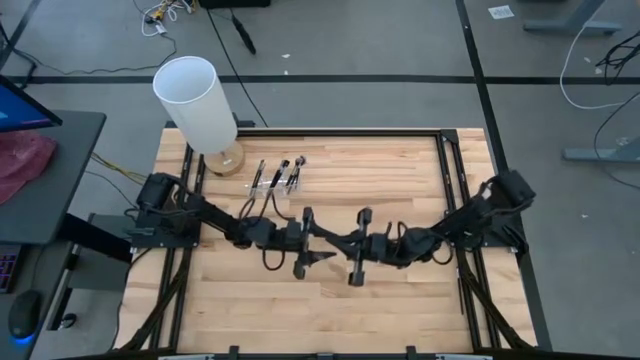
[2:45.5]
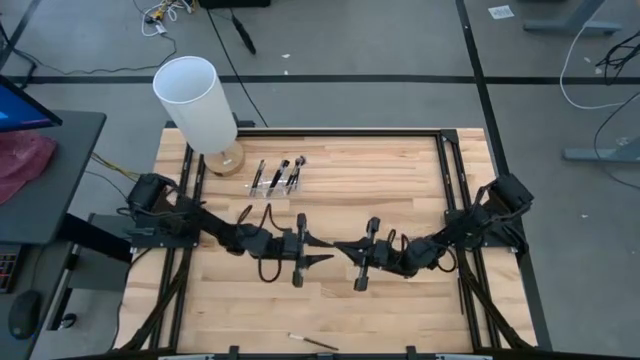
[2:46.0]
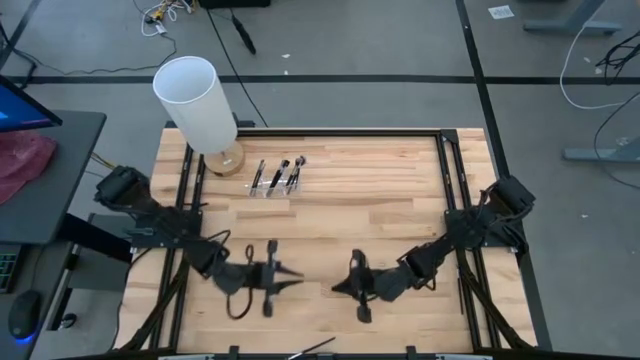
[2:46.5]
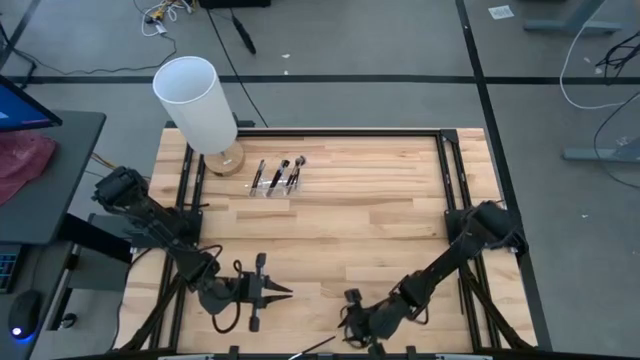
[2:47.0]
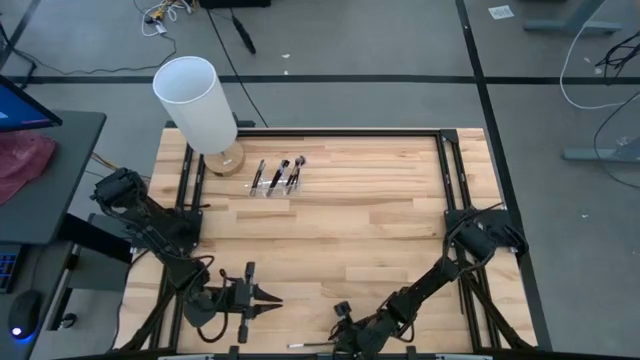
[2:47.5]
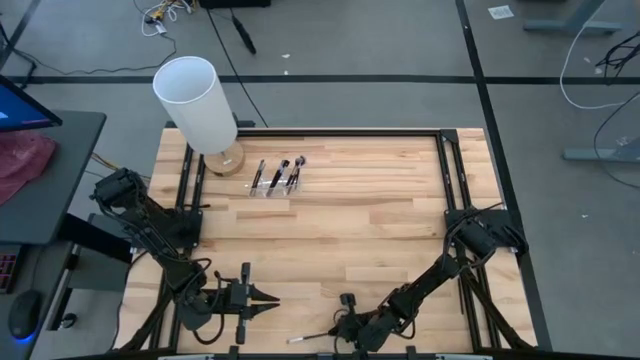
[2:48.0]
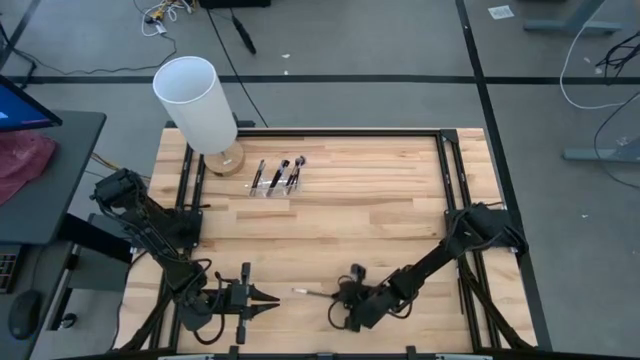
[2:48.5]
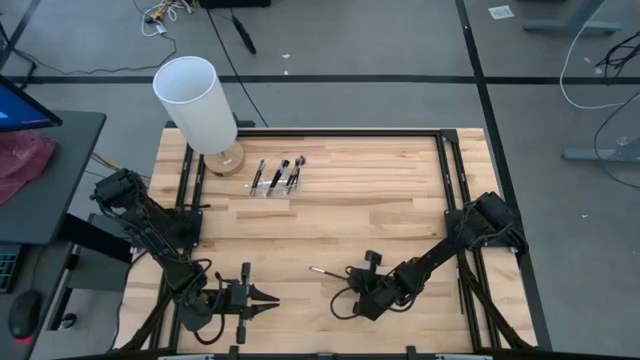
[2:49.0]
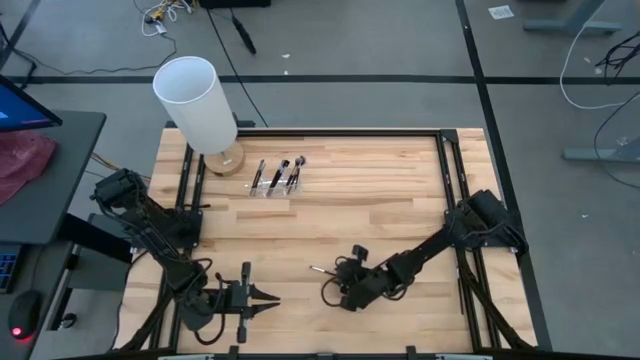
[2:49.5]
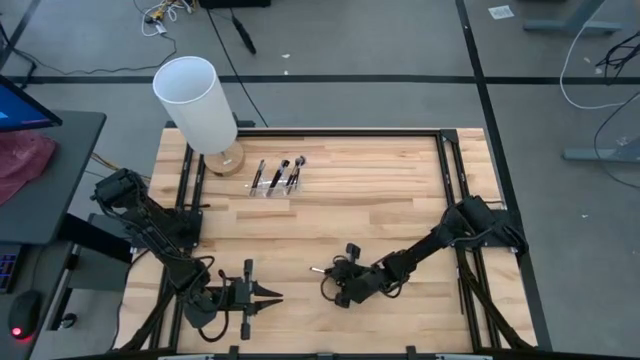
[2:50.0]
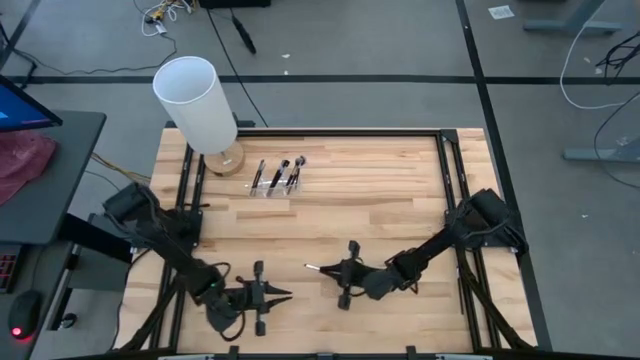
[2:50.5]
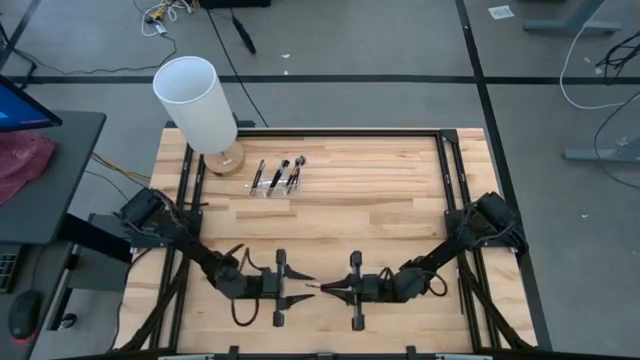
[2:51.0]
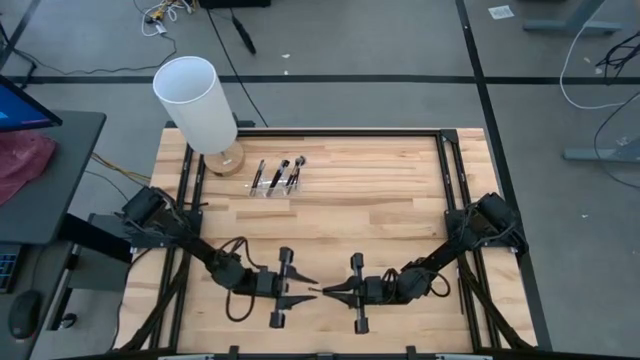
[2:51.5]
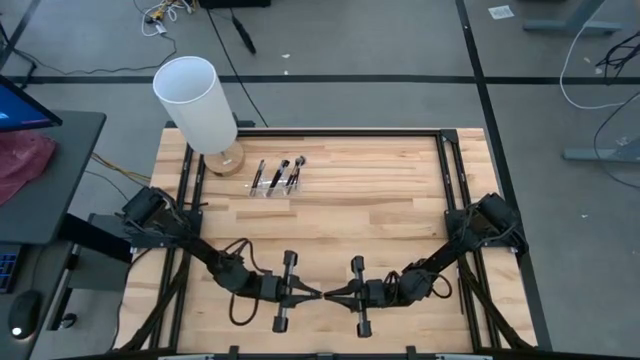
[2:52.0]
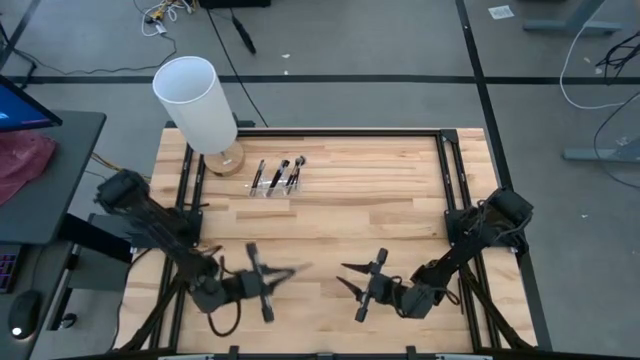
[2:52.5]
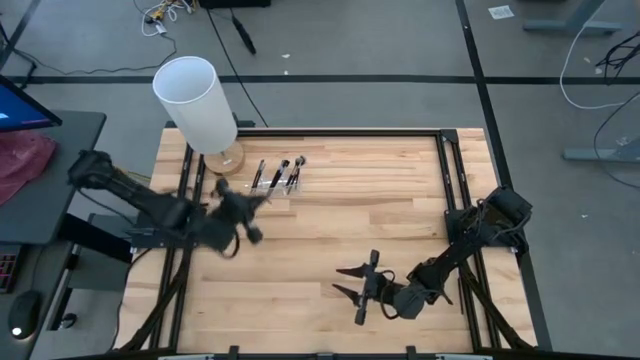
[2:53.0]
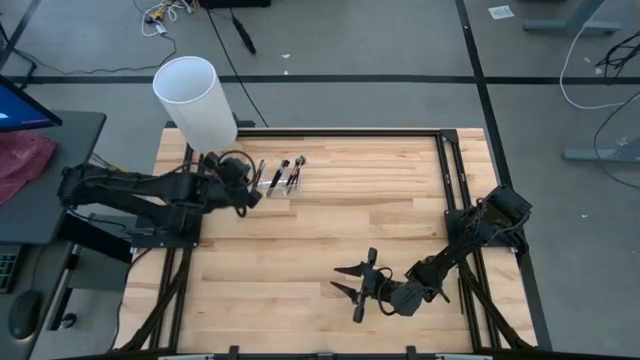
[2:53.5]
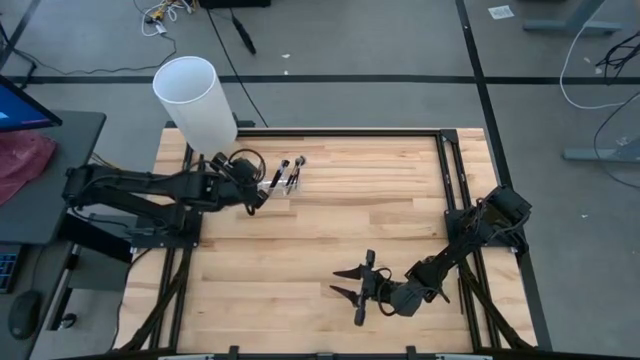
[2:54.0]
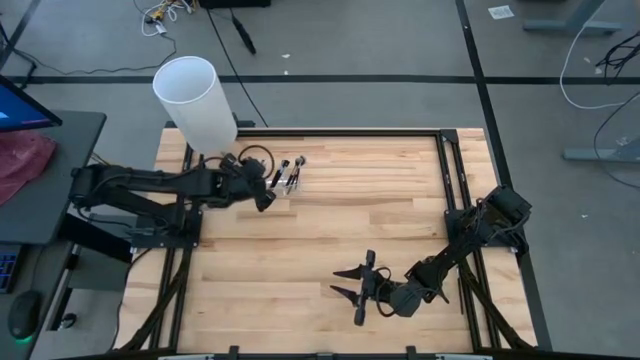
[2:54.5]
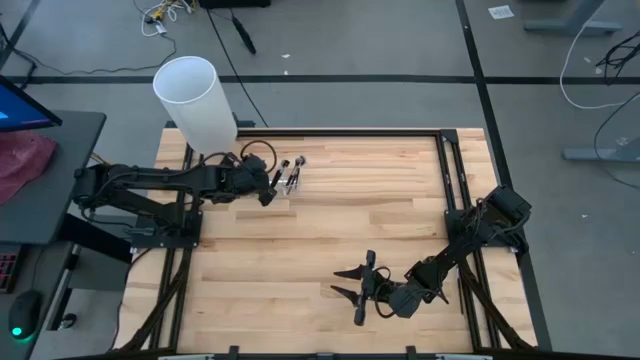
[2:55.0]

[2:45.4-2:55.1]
Task: Put items in baskets/containers
Put the eyeshadow brush into the transparent organizer

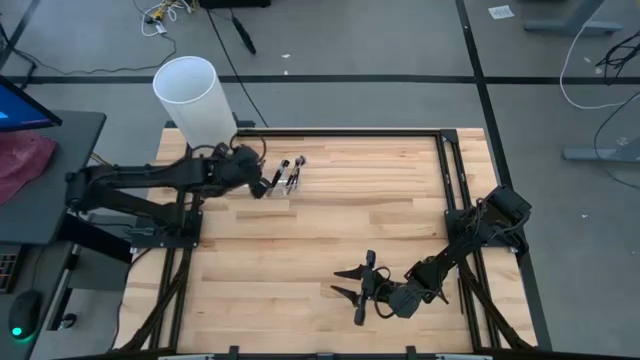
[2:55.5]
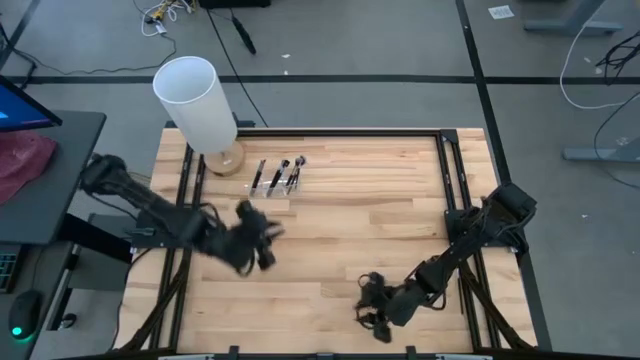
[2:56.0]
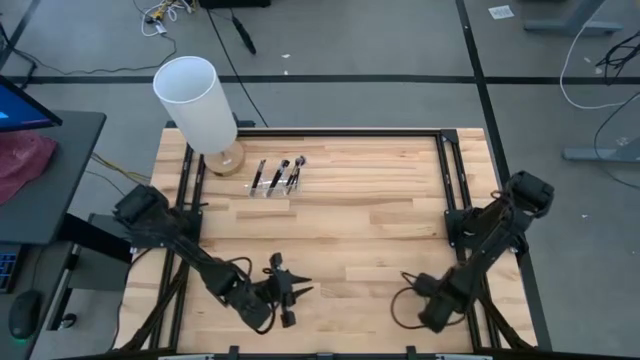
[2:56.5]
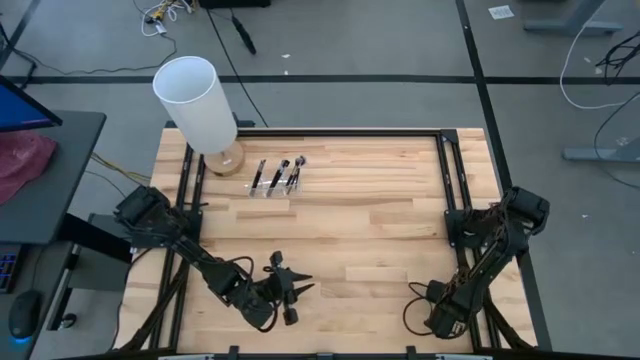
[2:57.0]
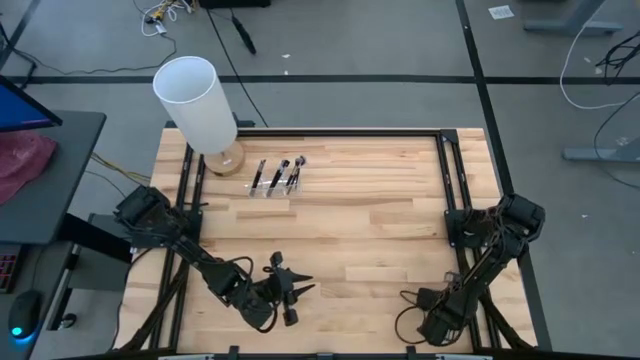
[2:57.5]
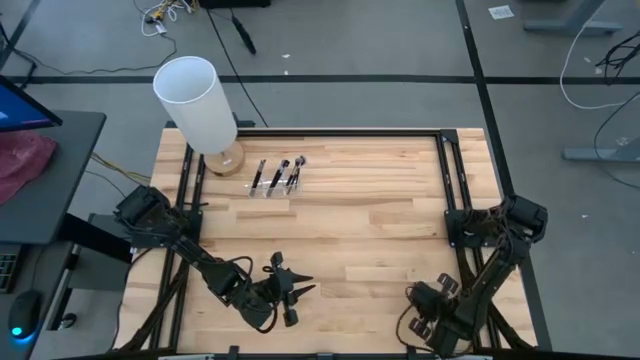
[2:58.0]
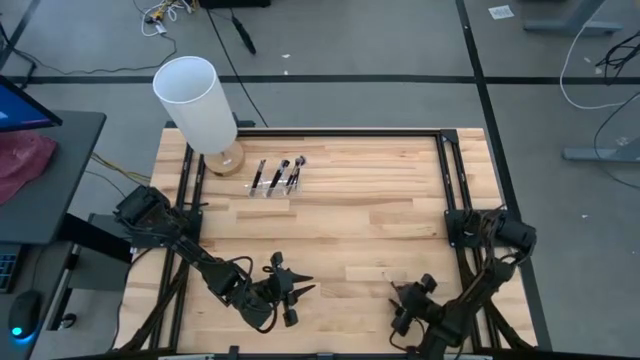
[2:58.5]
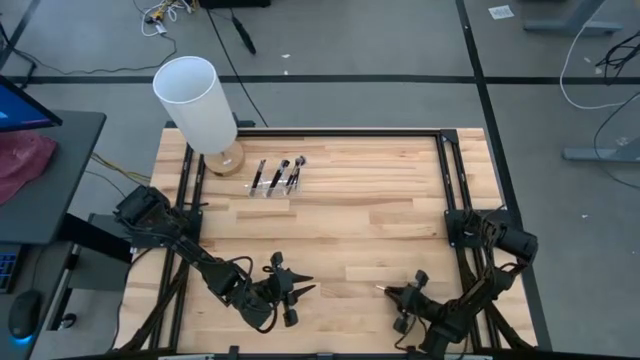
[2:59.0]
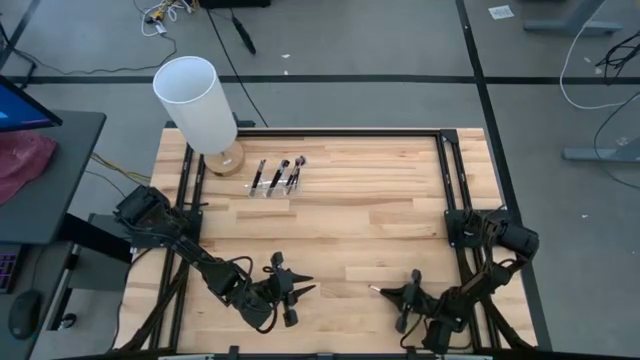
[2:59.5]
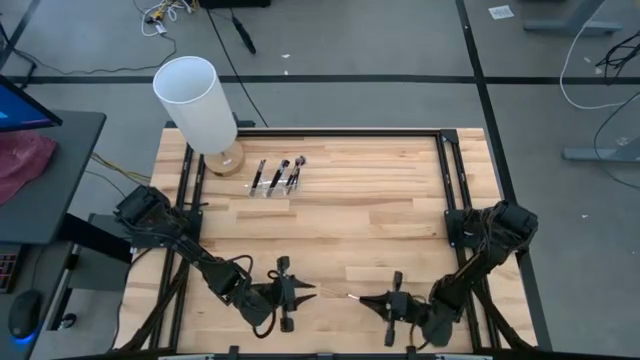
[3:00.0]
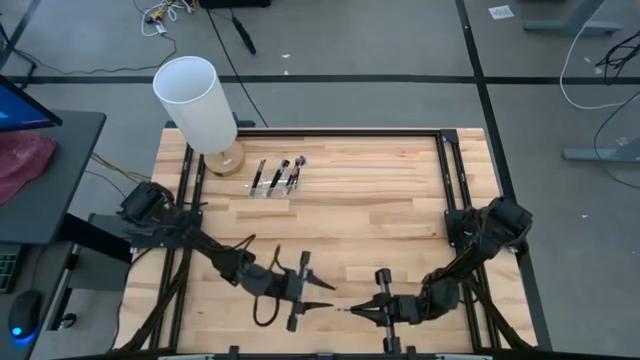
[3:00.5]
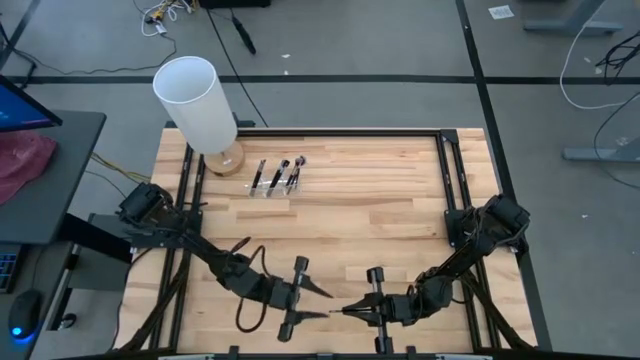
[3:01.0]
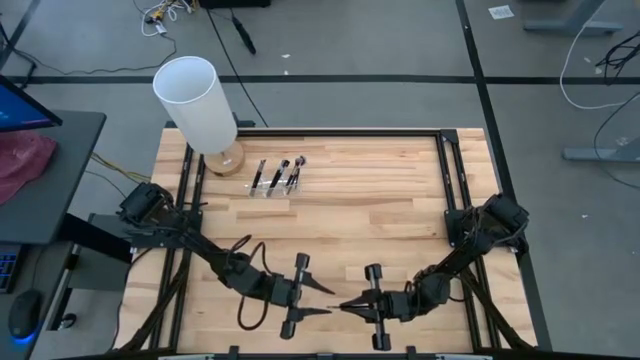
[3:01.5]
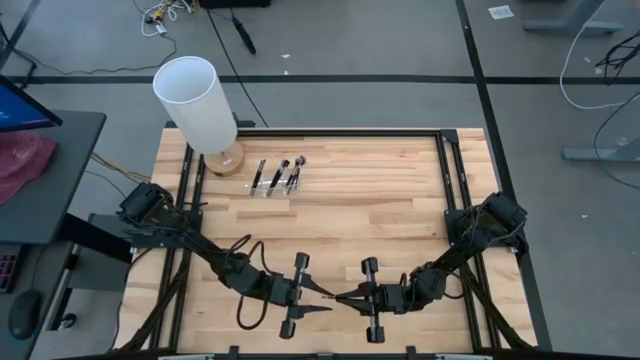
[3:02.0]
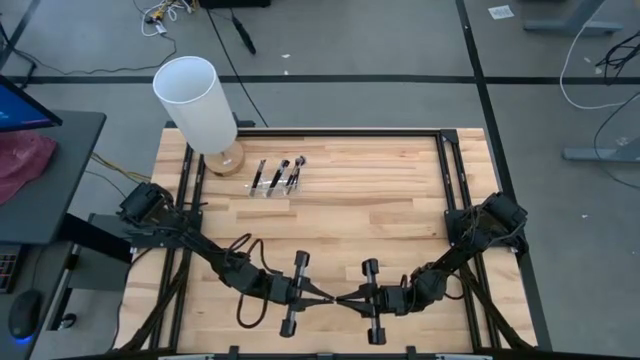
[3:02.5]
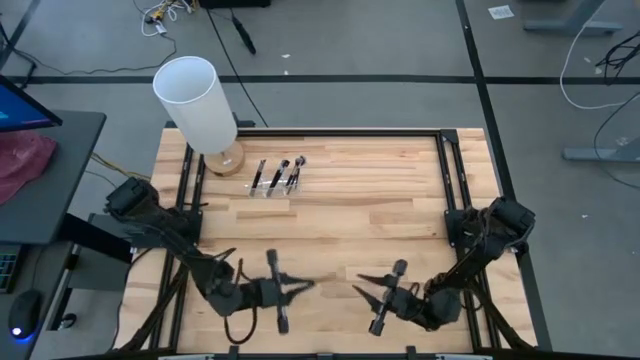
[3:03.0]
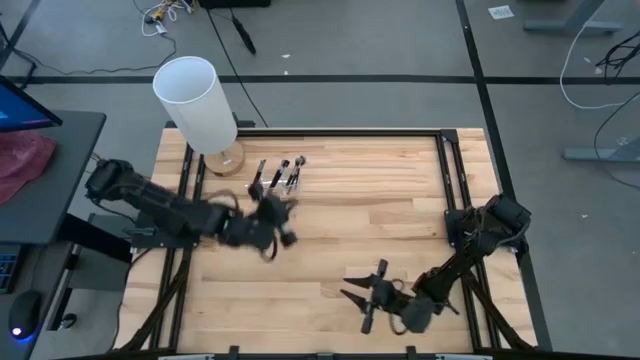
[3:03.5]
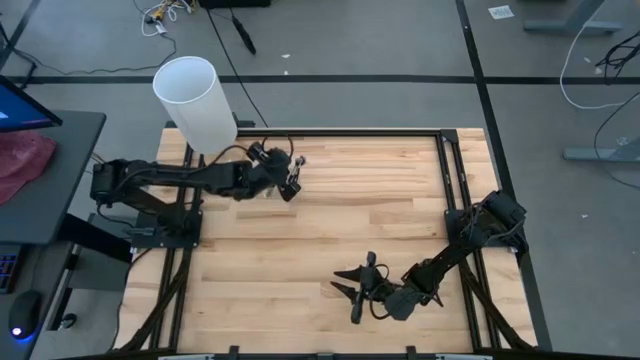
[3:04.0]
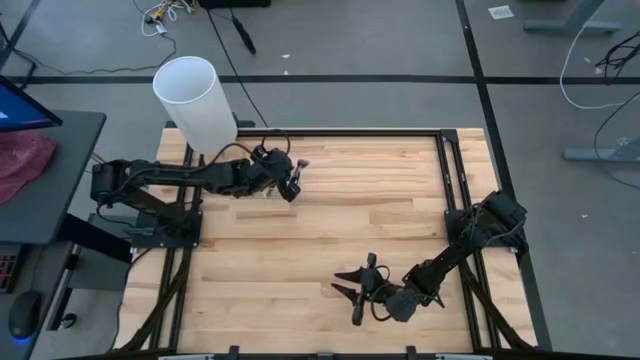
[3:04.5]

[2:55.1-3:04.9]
Put the eyeshadow brush into the transparent organizer

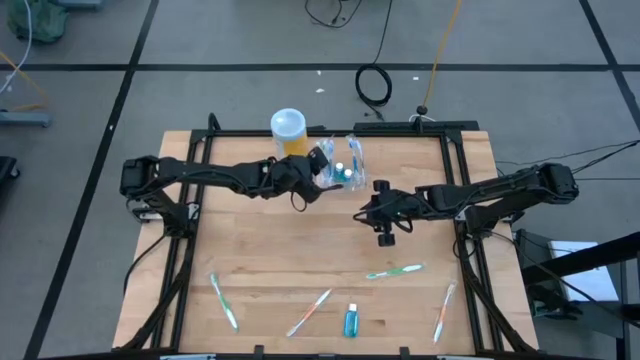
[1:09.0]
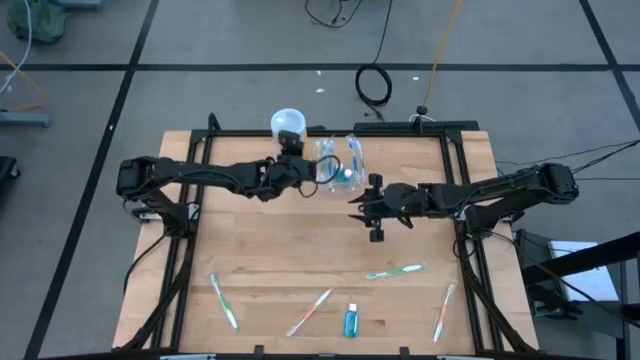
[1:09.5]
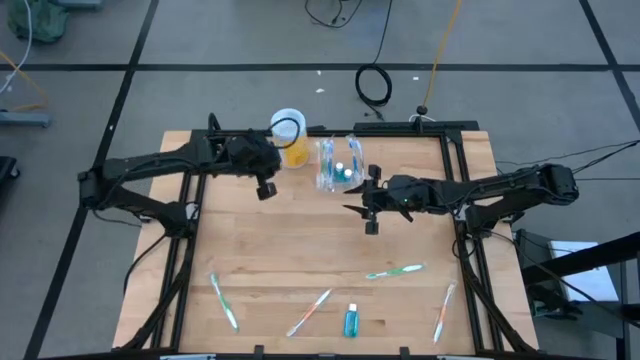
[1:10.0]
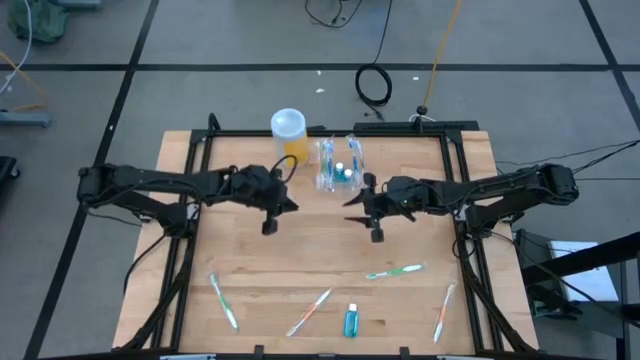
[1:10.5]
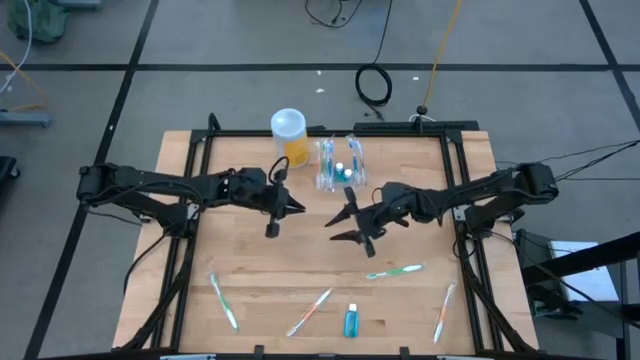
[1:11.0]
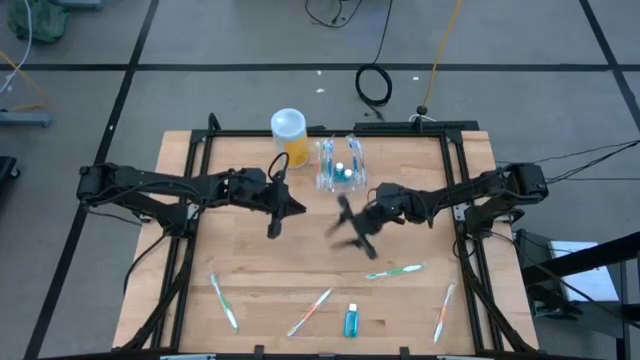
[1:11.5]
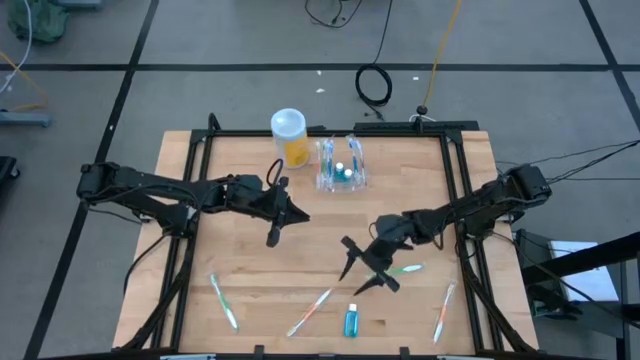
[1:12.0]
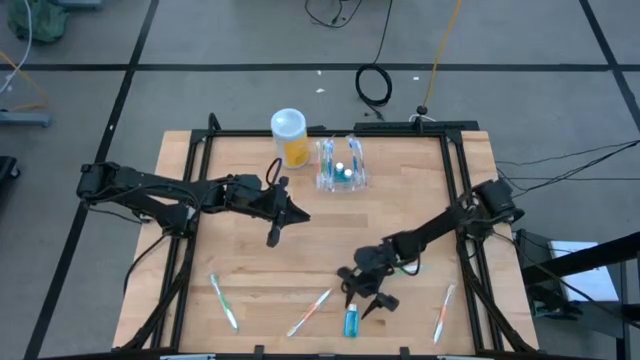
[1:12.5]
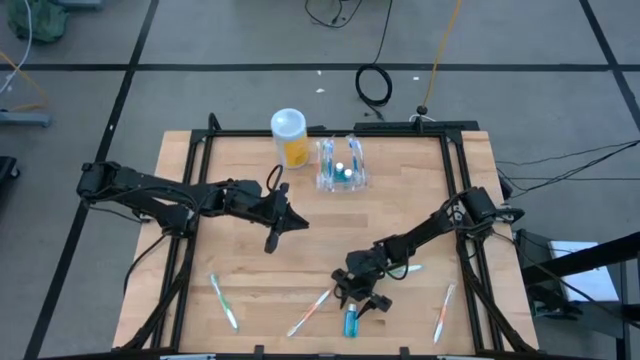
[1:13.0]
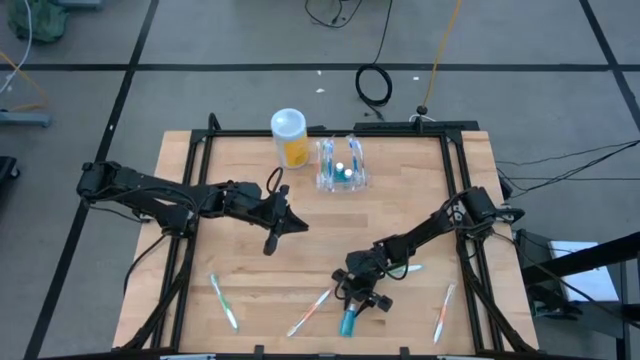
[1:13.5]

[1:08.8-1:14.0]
Task: Pick & Place toothbrushing station
Put the mouthwash into the center part of the transparent organizer
